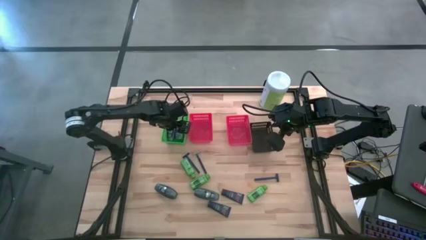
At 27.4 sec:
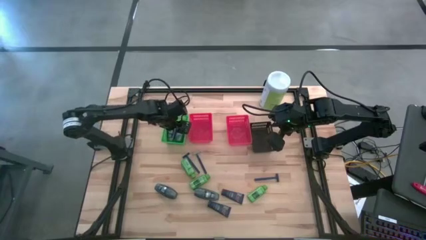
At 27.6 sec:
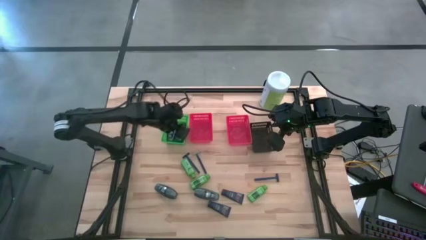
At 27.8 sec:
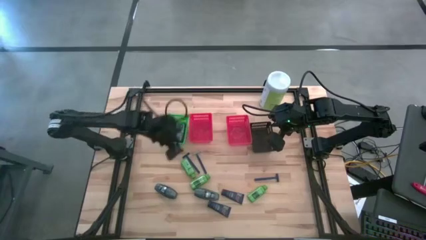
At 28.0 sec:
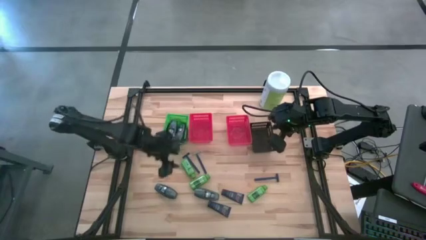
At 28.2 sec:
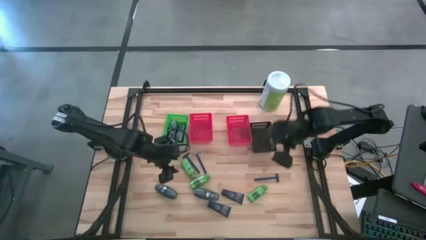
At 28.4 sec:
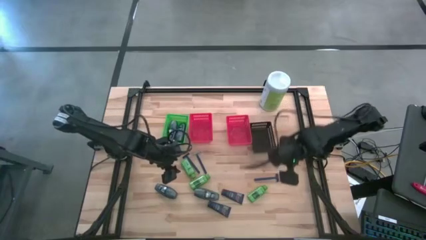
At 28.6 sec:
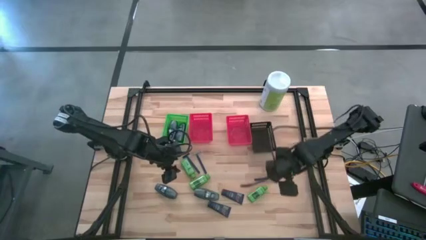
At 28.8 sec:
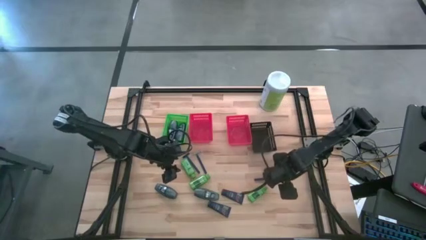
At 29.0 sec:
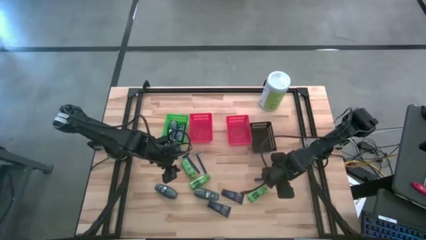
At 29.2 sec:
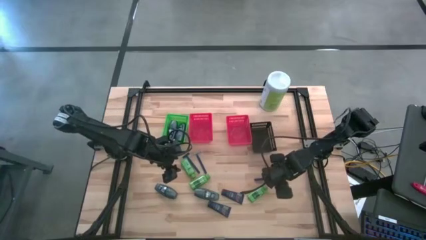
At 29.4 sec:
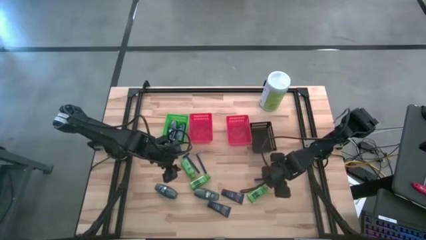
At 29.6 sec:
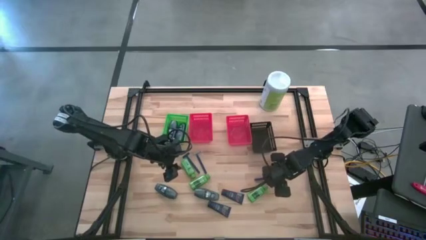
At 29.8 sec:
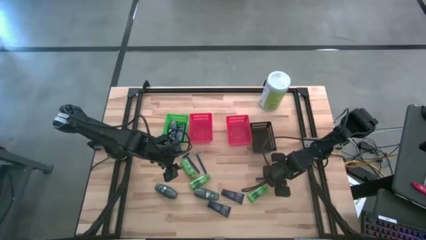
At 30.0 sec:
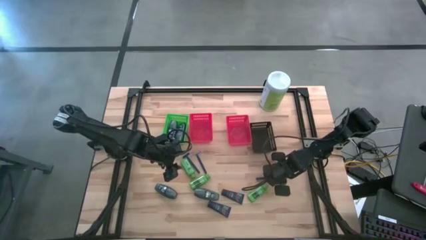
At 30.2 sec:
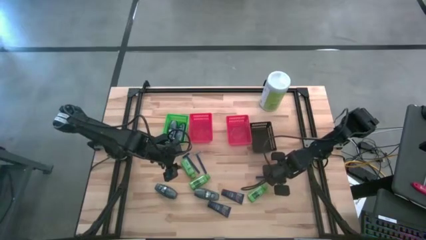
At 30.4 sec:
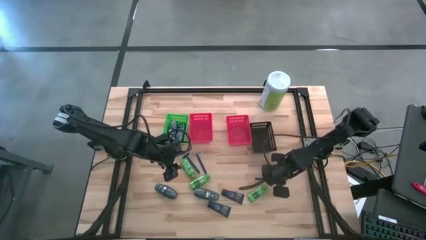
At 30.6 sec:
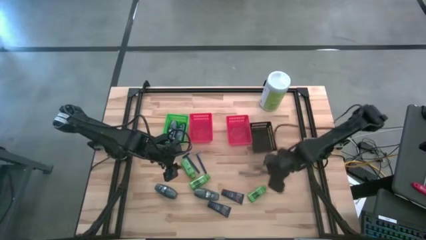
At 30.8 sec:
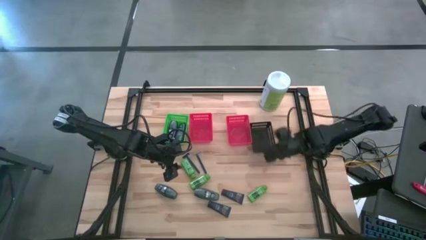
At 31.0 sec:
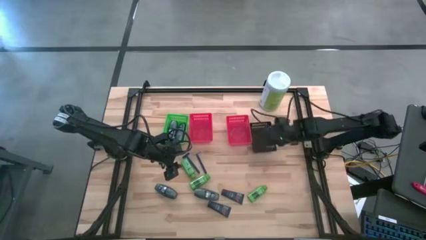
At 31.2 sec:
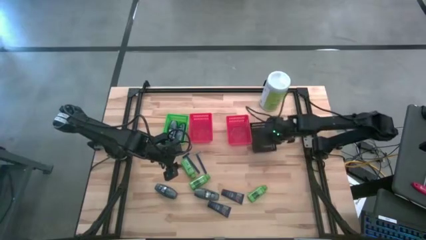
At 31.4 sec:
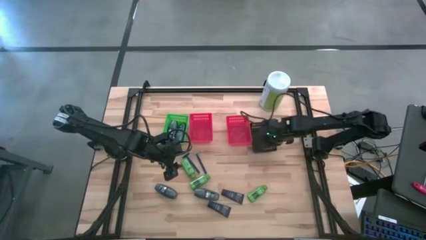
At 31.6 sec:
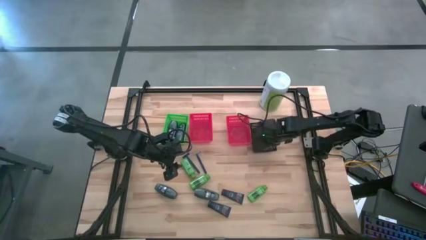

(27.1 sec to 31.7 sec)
Task: Pick & Place Travel size toiletries
Put the blue shaver into the black bin

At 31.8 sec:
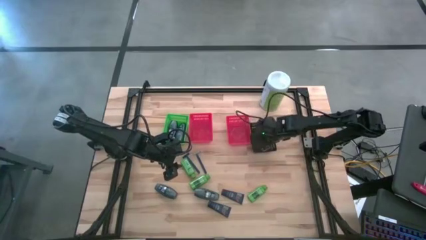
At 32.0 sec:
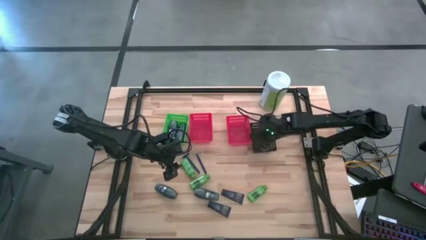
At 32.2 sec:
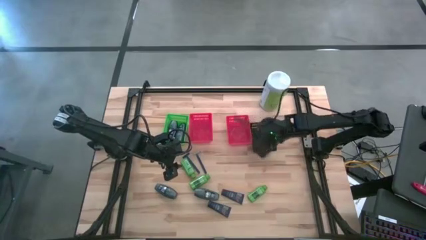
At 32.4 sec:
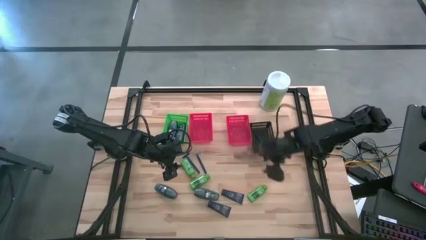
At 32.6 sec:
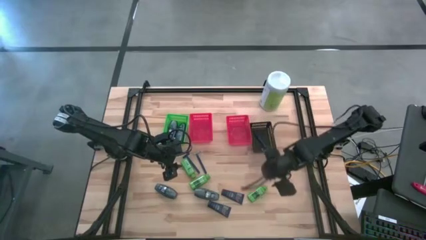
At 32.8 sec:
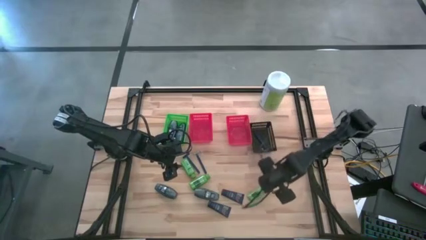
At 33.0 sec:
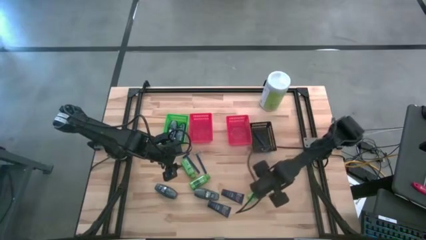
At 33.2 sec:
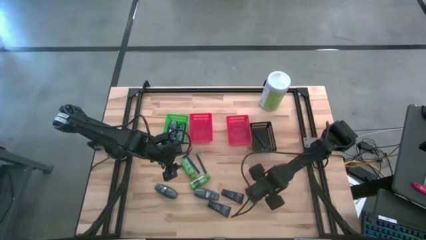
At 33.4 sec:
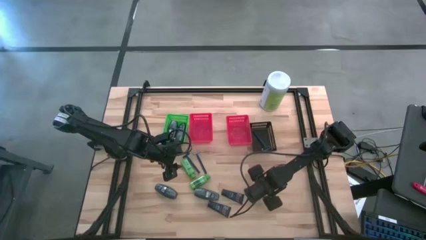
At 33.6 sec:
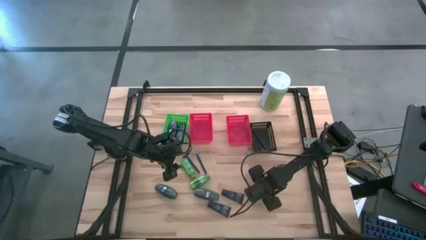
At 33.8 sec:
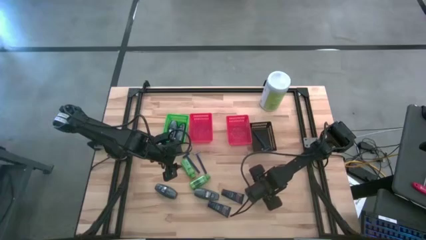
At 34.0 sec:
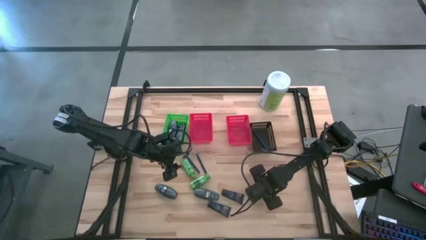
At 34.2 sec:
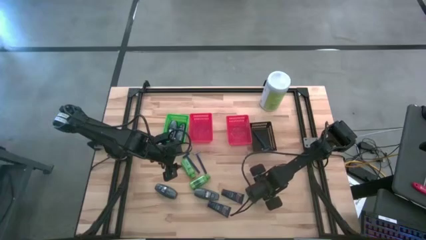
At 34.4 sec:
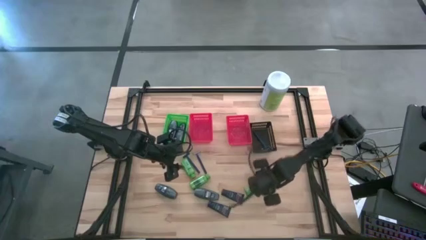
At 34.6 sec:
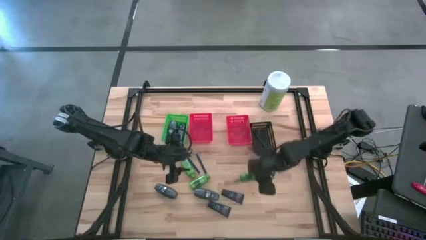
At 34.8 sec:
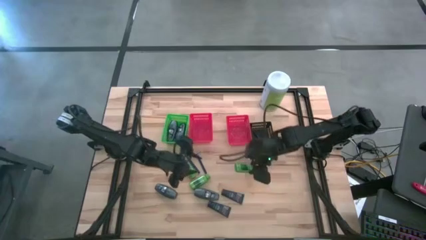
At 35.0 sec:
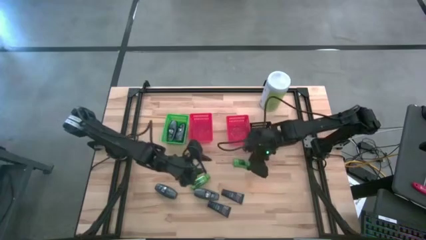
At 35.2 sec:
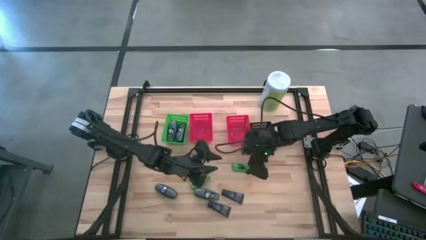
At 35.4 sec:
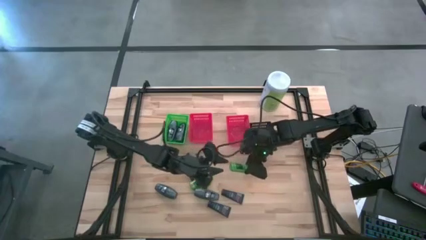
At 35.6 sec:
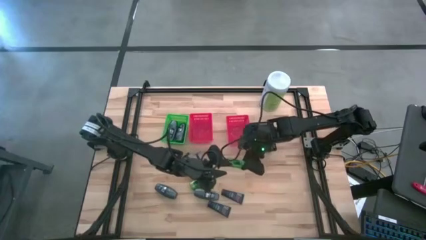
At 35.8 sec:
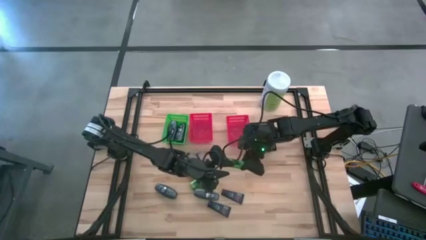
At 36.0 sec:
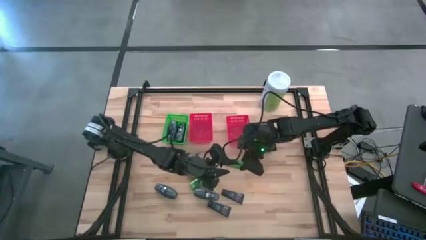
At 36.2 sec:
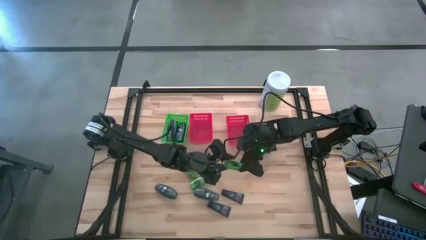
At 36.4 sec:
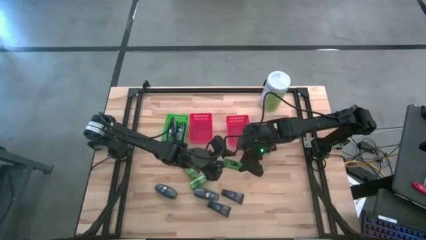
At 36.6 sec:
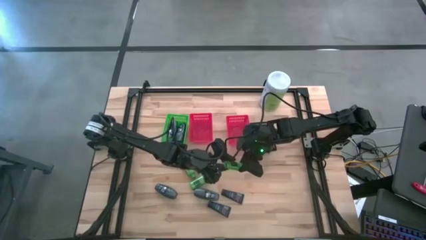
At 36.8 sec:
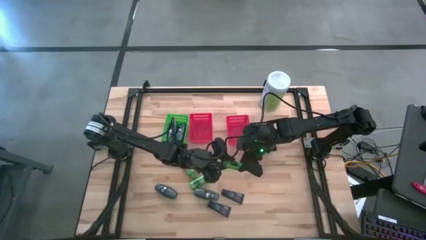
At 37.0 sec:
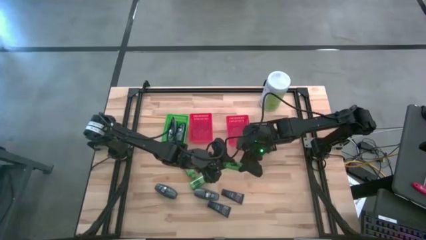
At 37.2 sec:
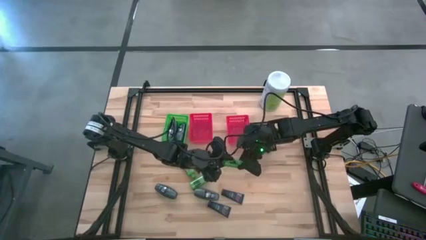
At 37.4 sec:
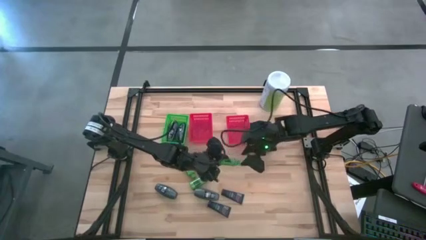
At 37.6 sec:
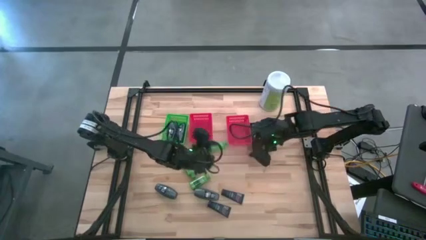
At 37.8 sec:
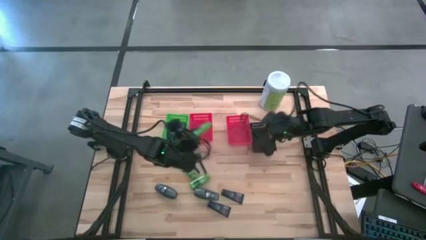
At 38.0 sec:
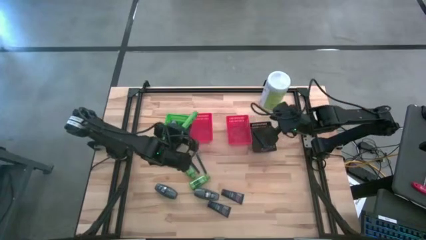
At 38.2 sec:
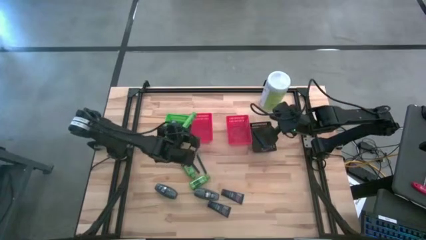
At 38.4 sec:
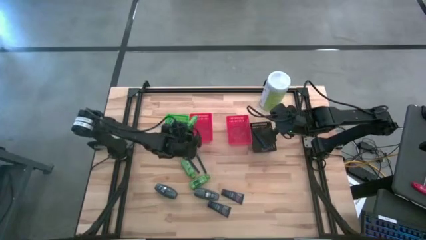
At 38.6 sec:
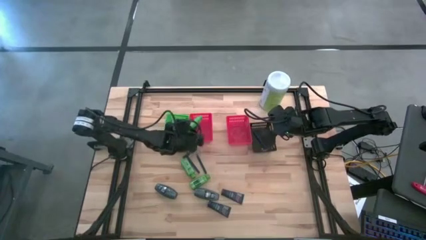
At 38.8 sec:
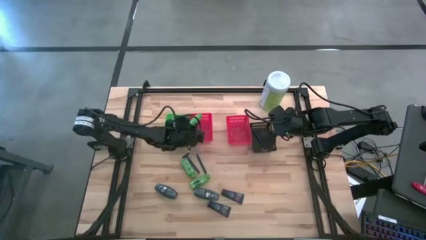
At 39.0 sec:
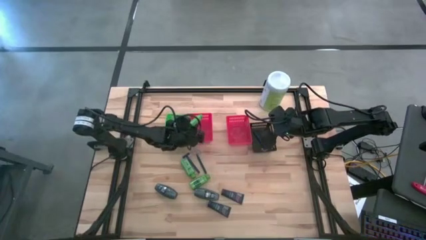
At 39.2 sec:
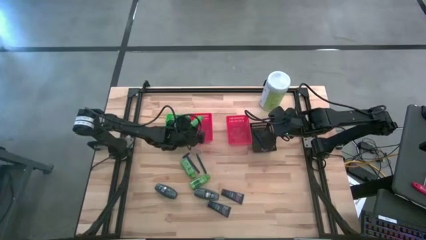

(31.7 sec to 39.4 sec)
Put the green shampoo bottle into the left red bin

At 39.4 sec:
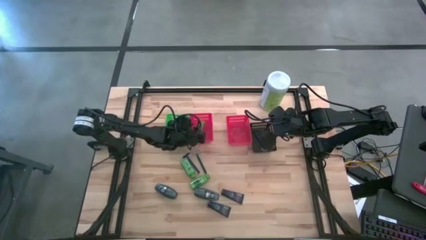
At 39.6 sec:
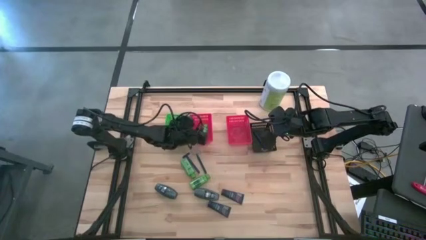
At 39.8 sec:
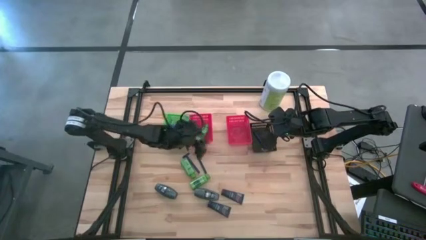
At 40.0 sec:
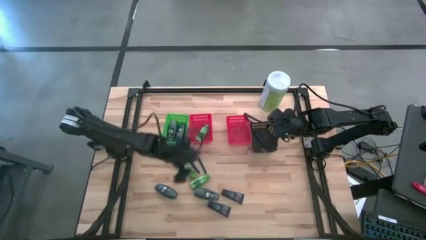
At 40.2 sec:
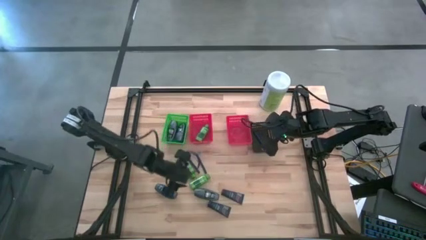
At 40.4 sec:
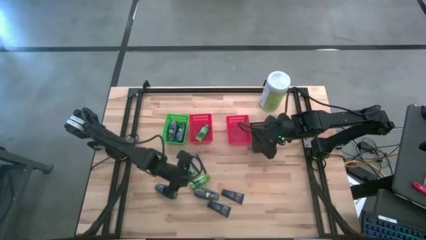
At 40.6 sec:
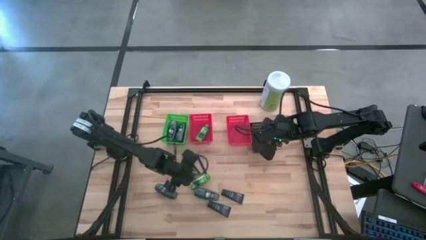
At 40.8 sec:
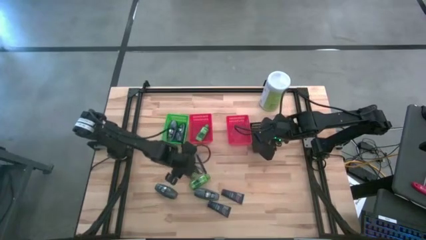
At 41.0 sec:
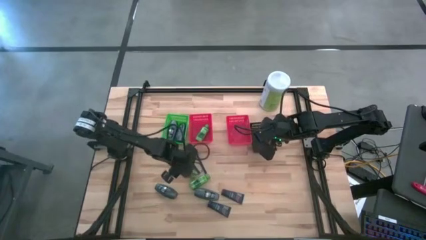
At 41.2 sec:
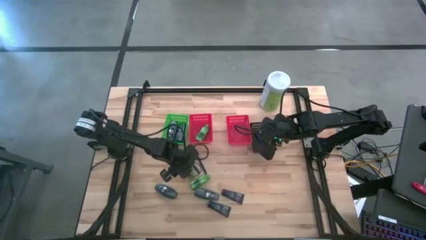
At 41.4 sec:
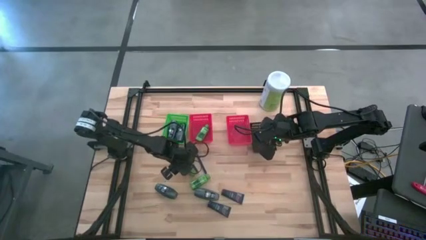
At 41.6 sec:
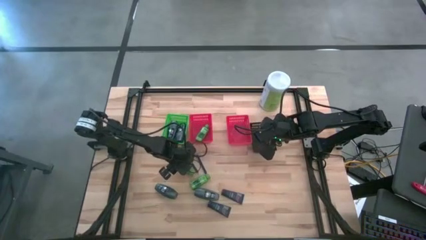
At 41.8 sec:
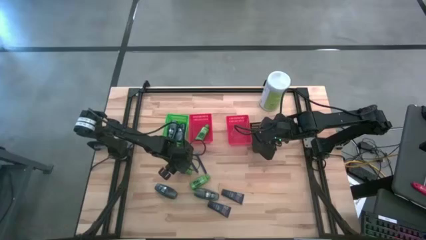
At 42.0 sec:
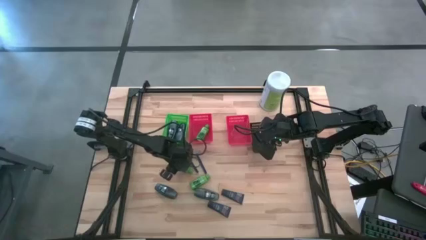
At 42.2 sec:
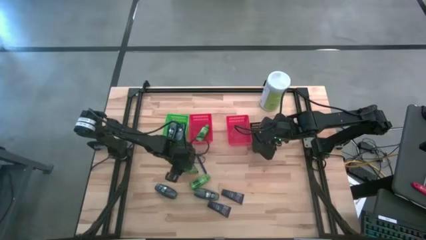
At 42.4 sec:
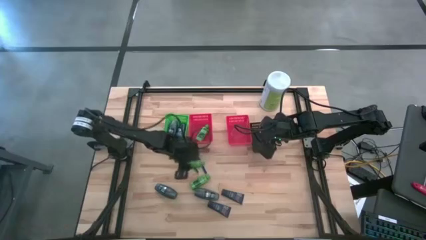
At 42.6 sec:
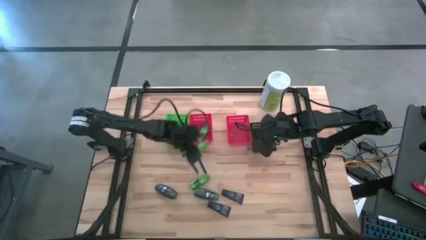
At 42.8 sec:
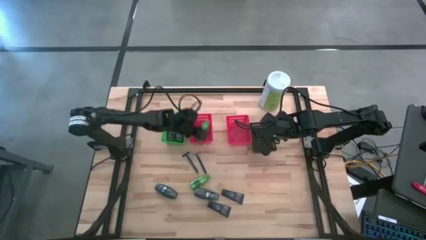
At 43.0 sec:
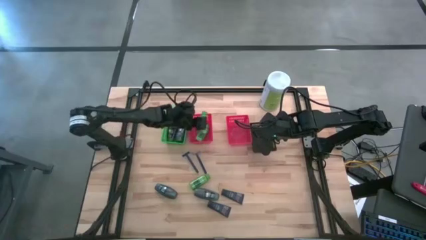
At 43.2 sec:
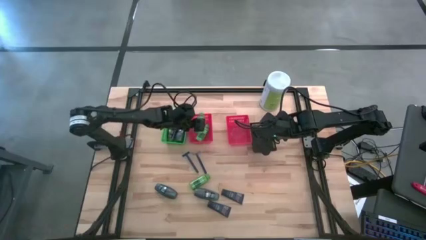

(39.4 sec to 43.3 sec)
Put the green shampoo bottle into the left red bin
